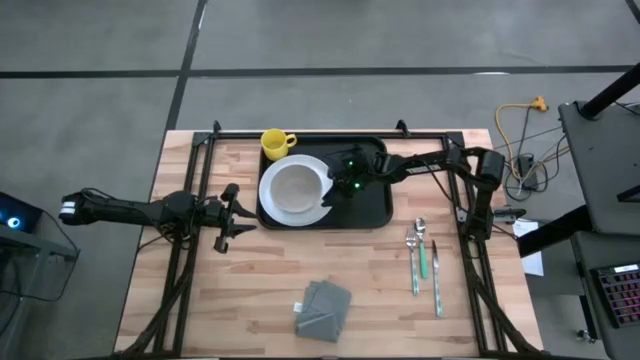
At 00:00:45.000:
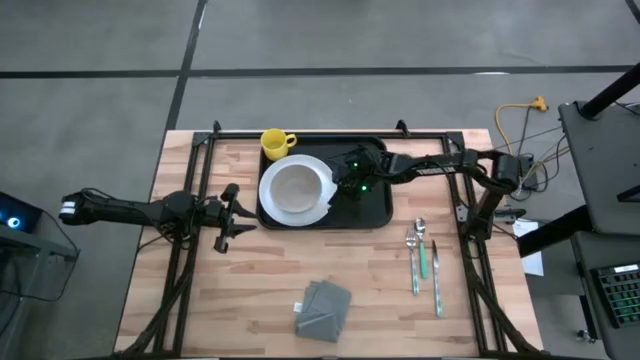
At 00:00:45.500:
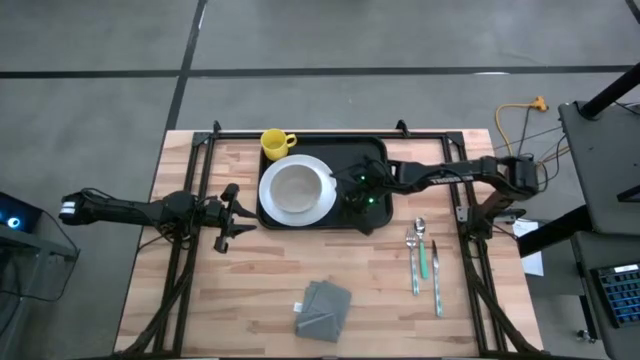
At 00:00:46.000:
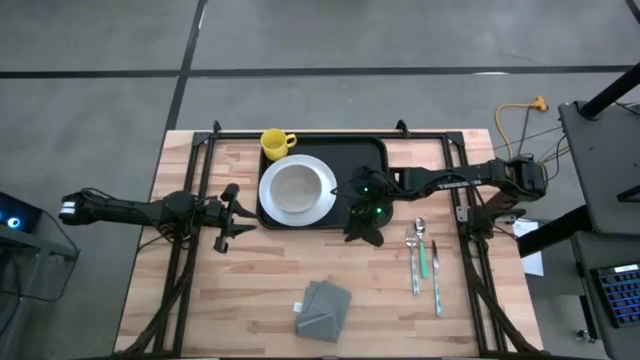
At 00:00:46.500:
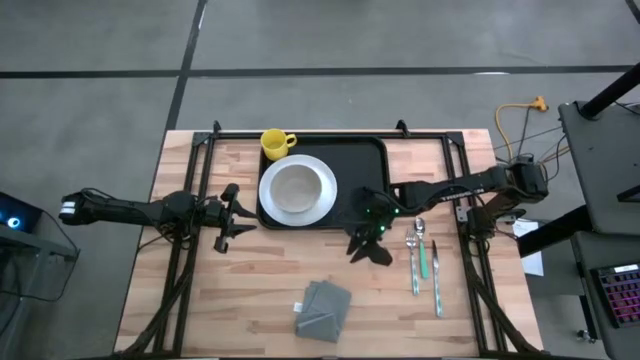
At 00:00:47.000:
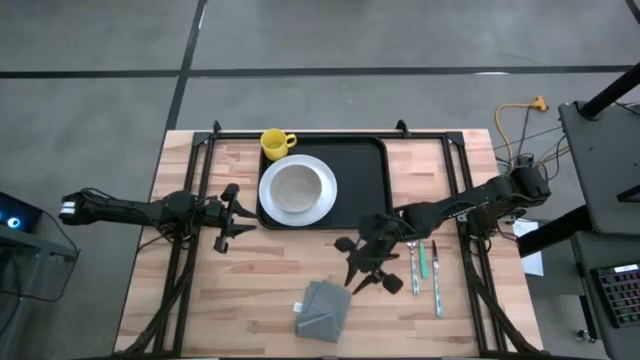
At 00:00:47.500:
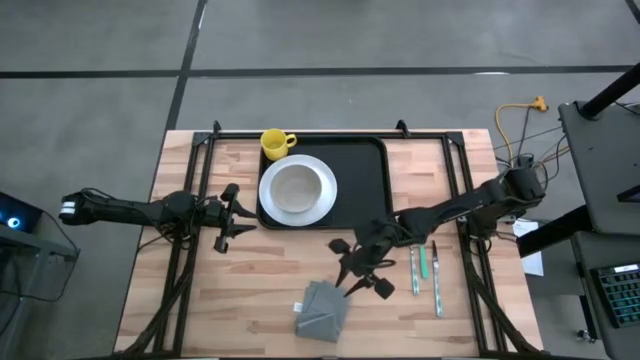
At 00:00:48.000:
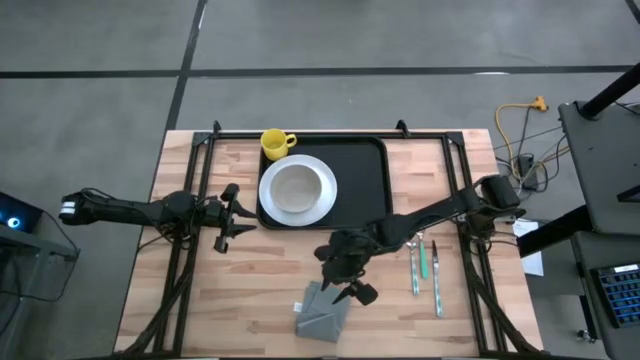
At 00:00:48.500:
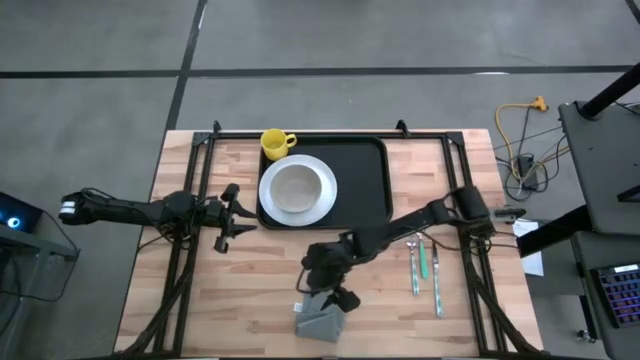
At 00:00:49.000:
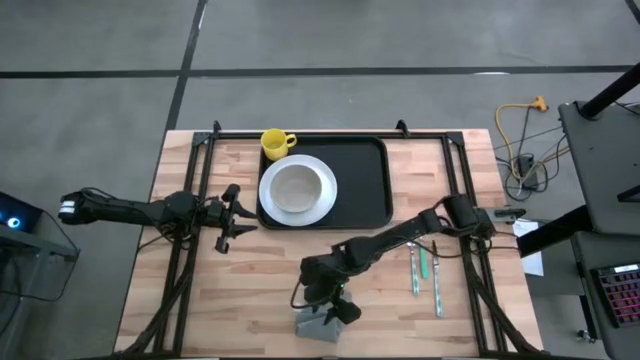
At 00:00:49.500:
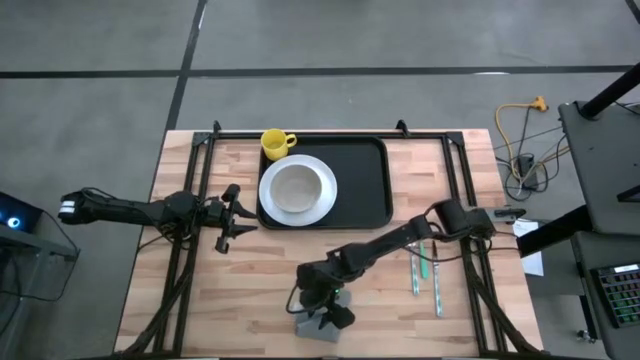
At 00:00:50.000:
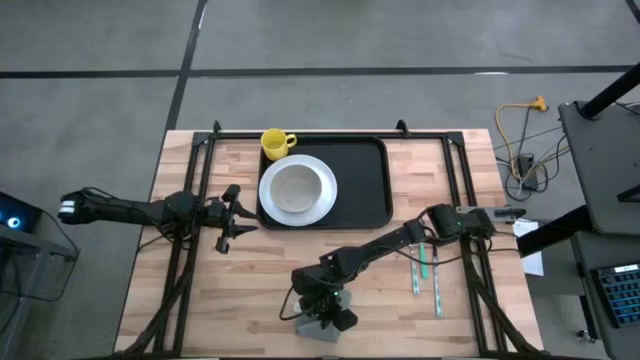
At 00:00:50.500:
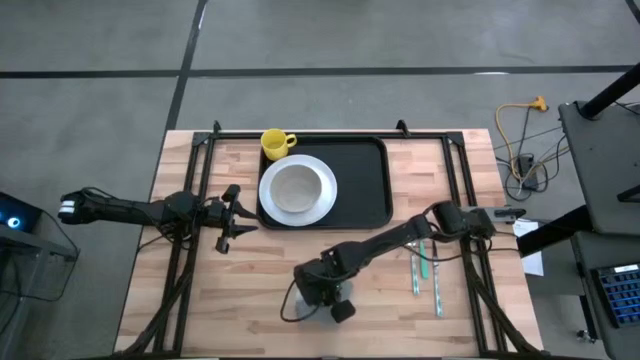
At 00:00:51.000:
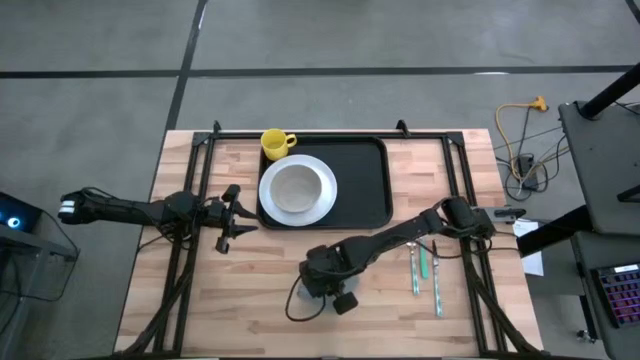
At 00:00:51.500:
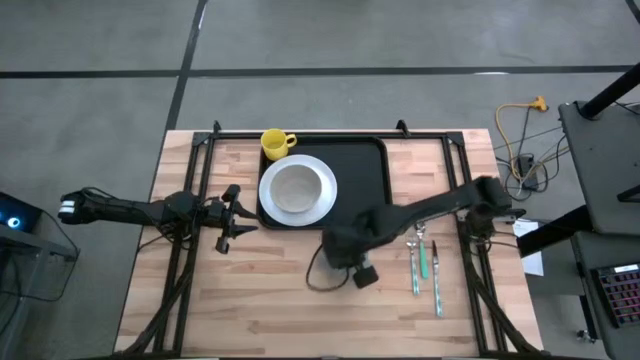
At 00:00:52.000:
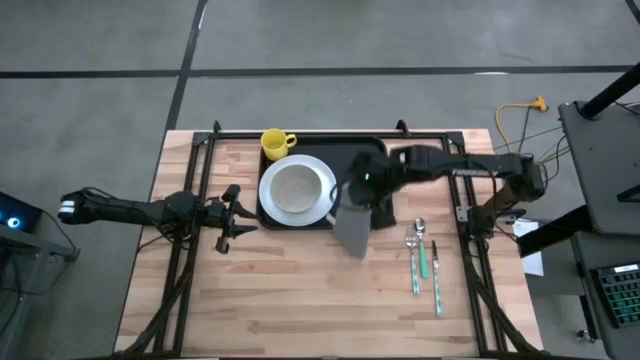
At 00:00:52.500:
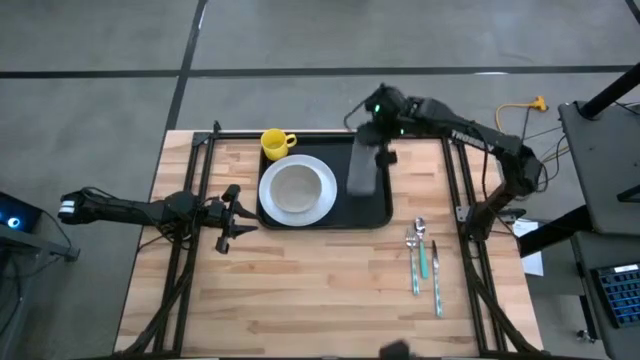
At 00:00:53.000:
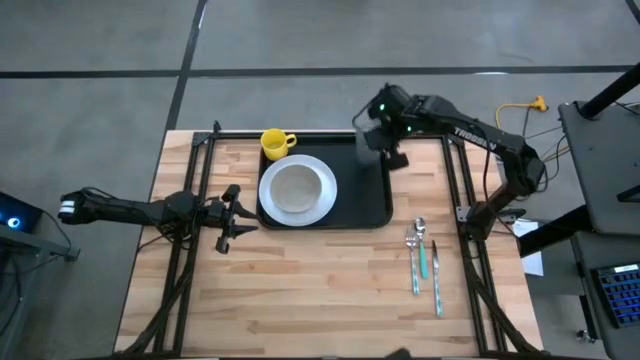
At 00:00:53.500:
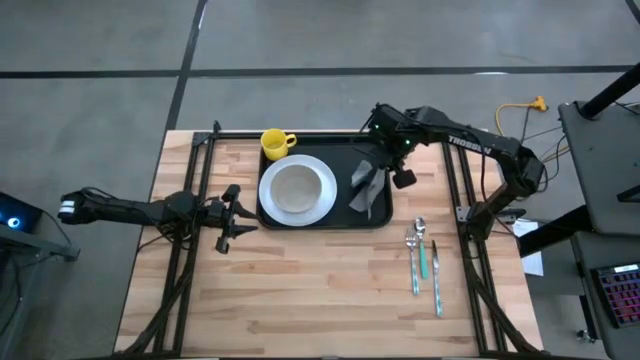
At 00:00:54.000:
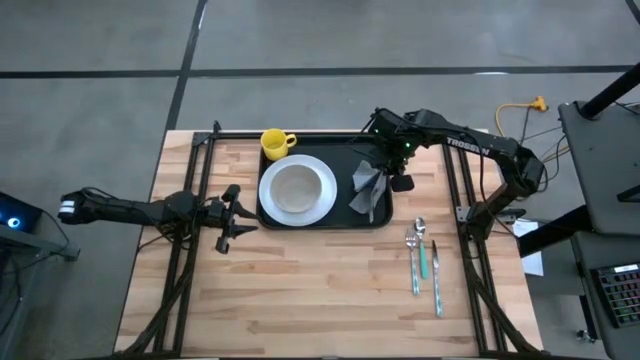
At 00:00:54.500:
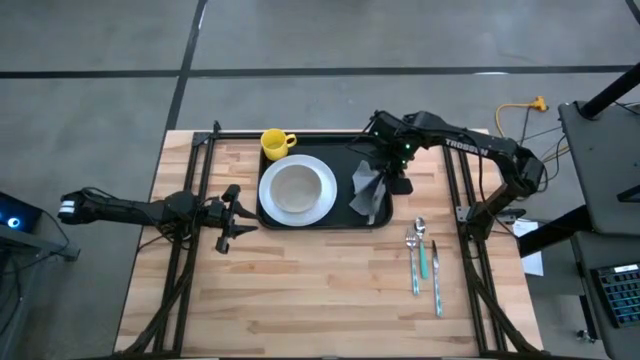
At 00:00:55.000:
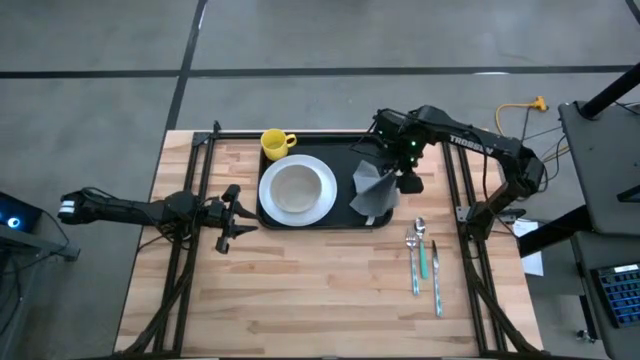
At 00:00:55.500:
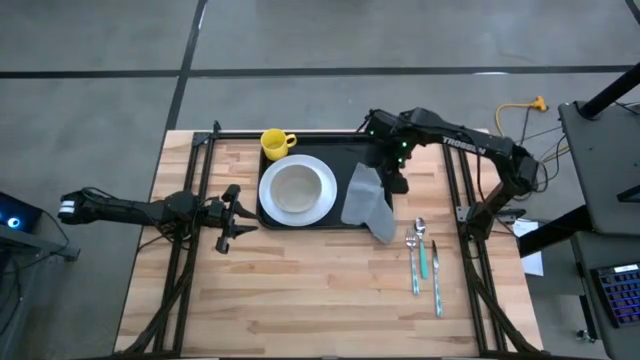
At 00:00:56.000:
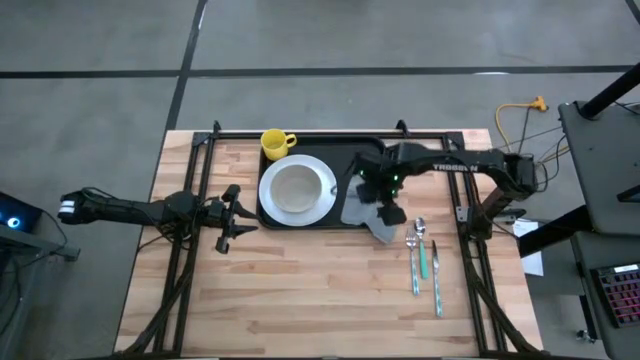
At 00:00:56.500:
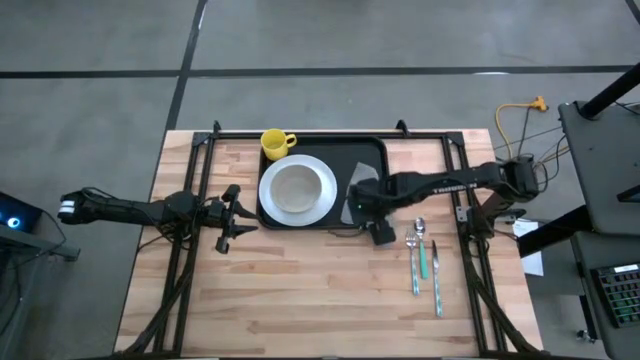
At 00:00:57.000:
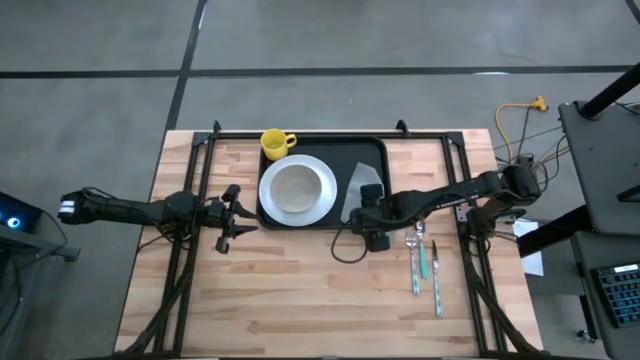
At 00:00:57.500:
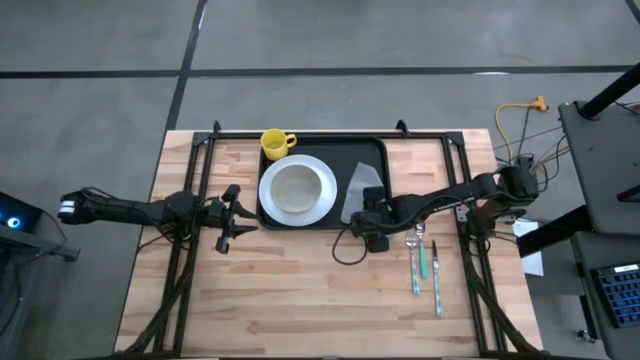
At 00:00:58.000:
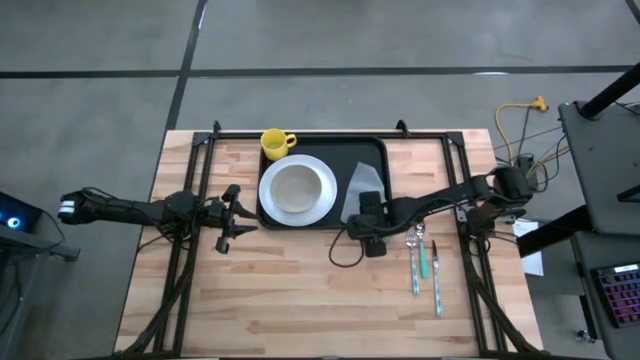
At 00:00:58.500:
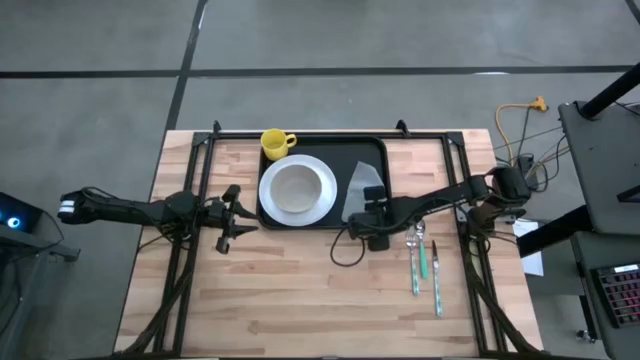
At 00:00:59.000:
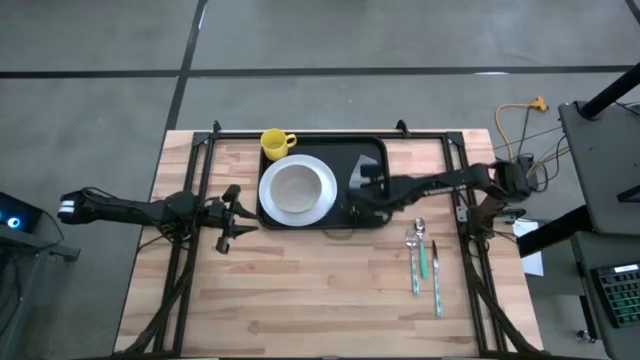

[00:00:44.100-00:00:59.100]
Task: Set up tray
Put the gray napkin on the right side of the white plate

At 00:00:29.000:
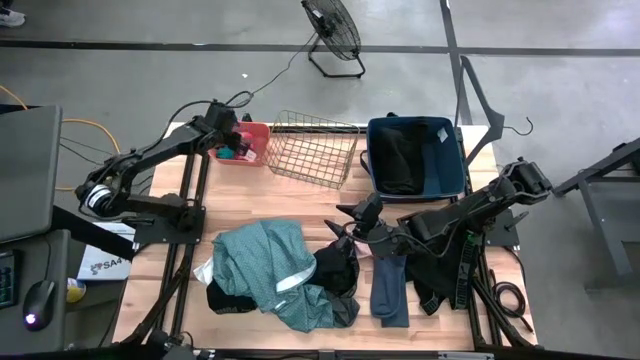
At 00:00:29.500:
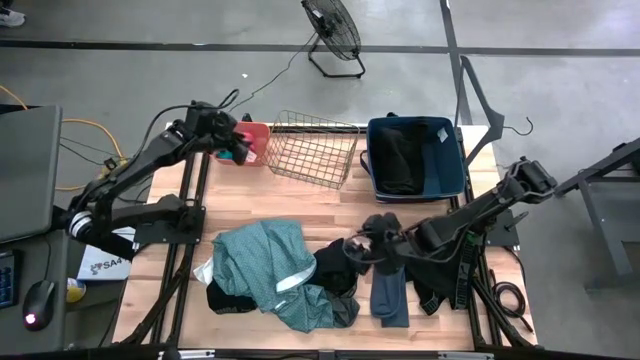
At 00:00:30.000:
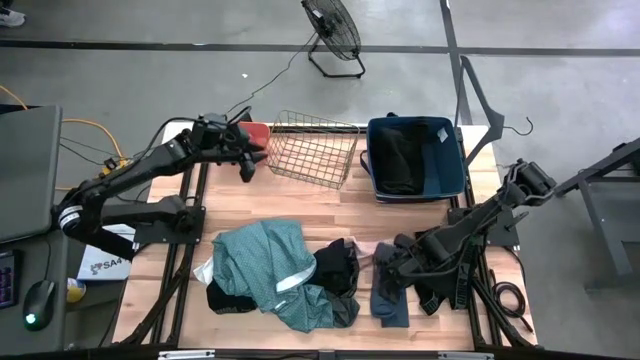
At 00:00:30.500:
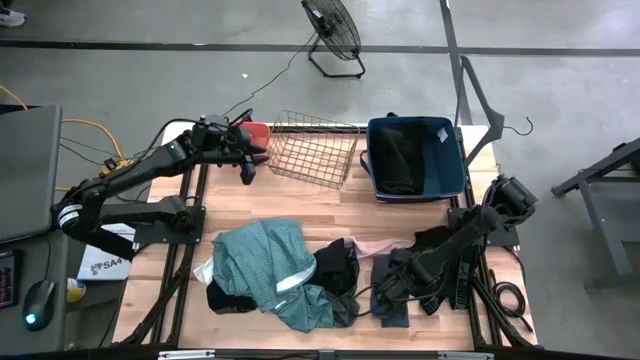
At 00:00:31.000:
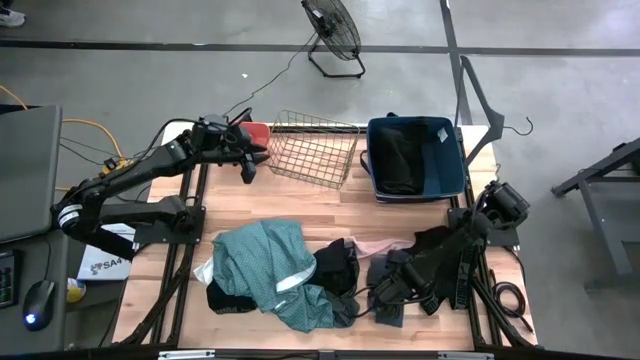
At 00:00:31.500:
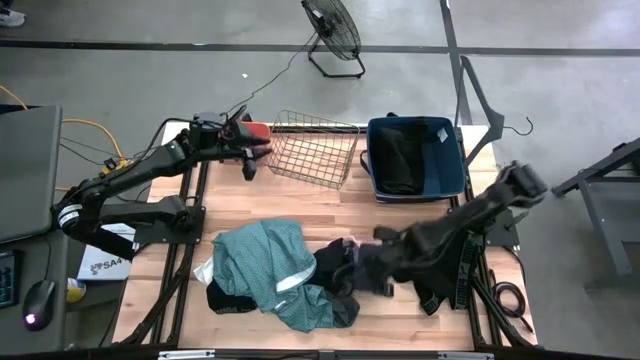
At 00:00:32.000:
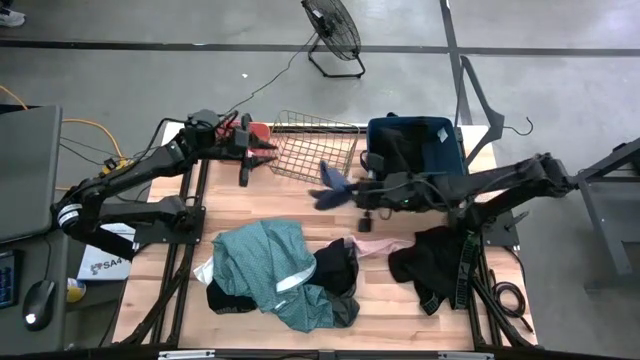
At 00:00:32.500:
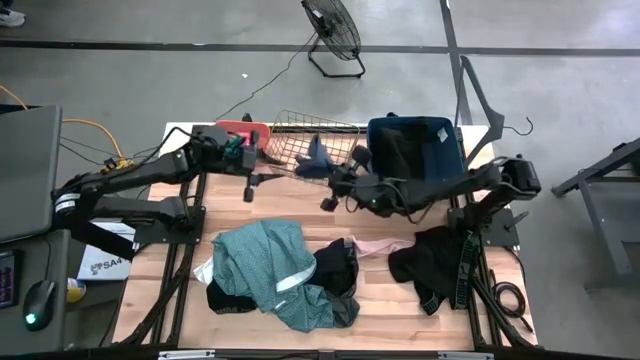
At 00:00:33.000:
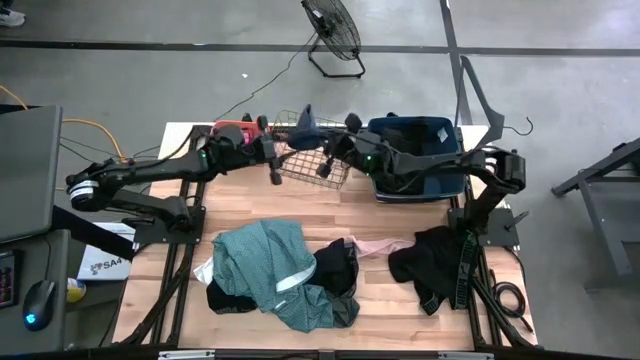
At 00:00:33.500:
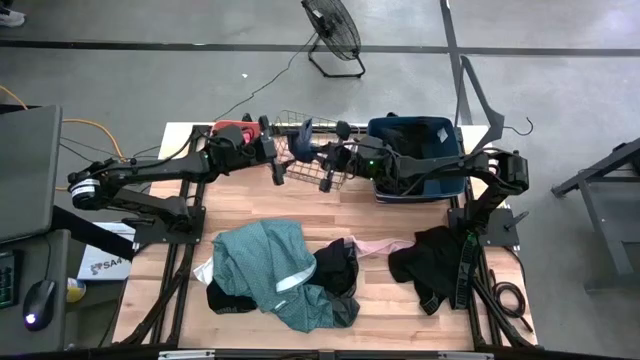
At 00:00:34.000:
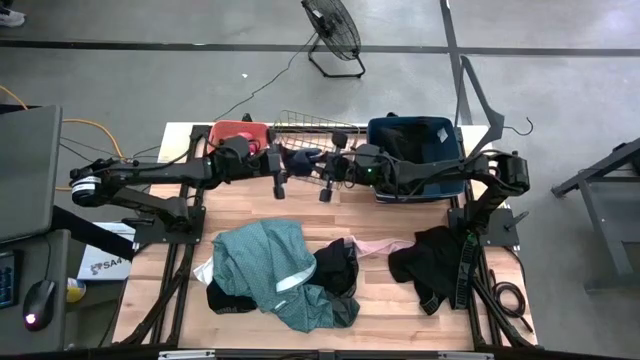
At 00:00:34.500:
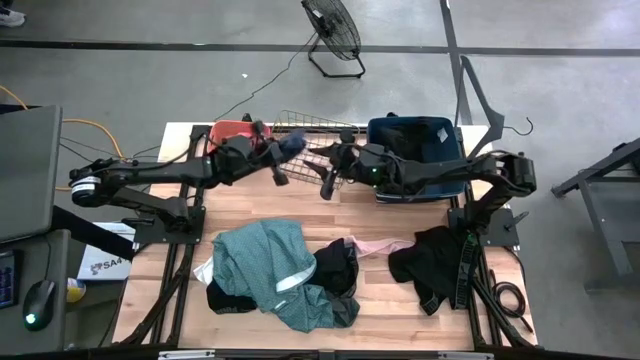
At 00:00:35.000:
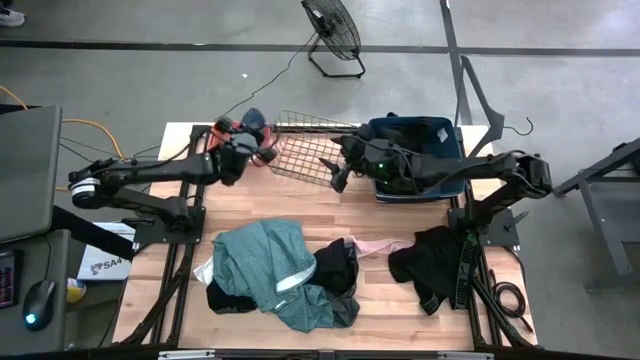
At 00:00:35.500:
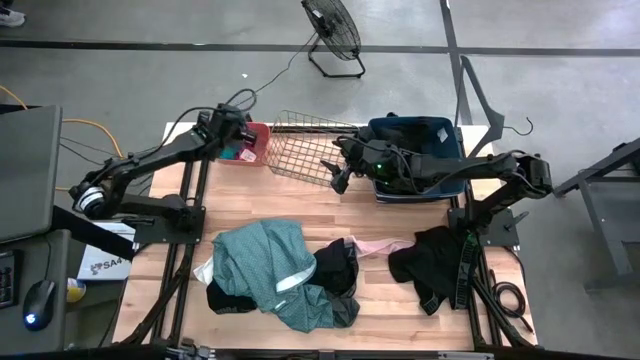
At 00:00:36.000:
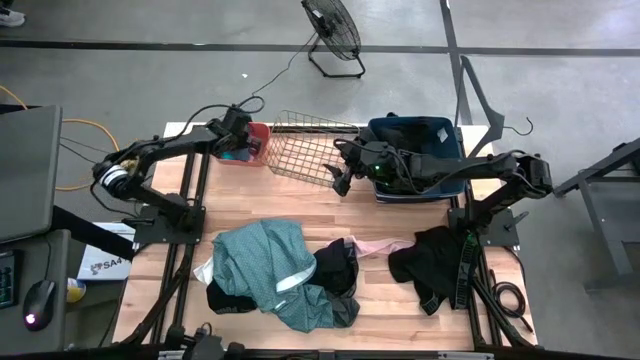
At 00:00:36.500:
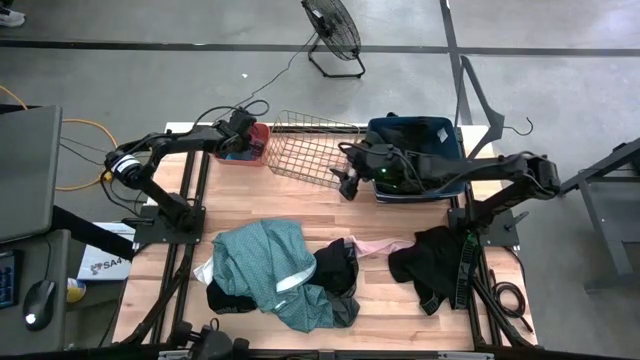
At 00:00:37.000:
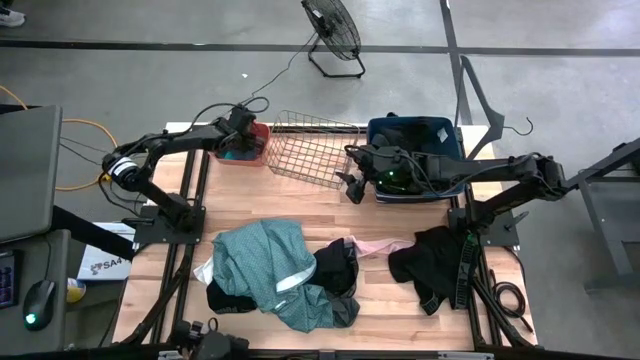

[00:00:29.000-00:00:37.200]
Task: Pick & Place Cloths
Put the violet sock into the orange bin
